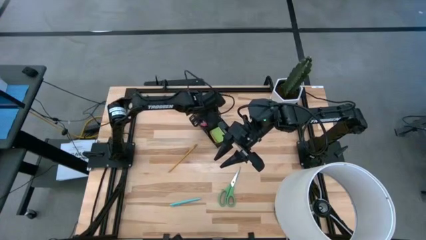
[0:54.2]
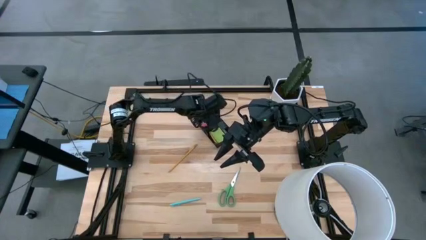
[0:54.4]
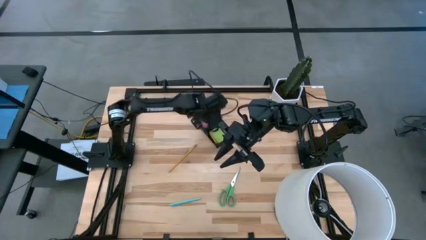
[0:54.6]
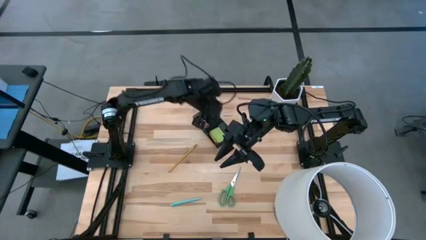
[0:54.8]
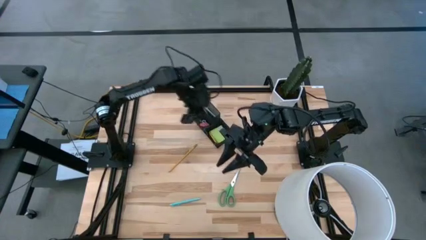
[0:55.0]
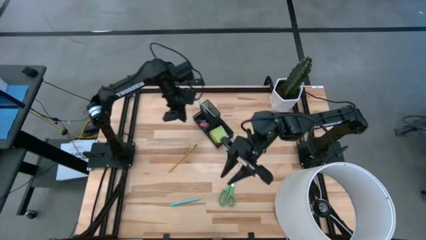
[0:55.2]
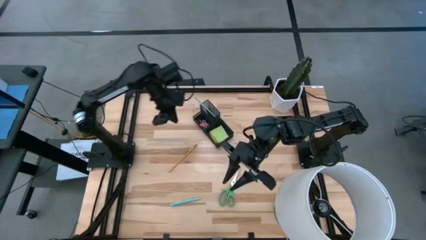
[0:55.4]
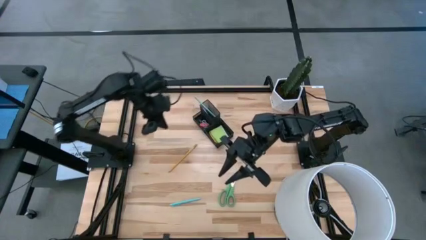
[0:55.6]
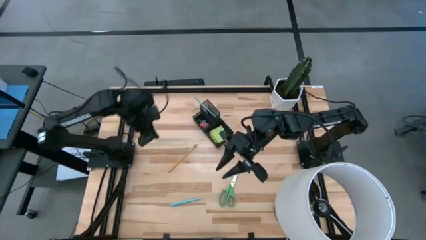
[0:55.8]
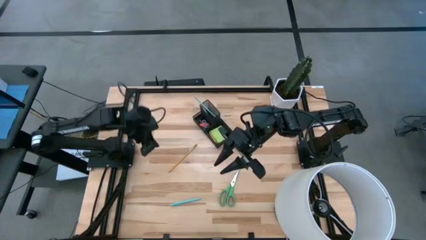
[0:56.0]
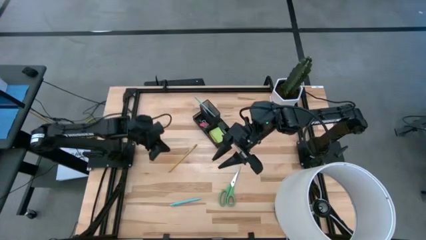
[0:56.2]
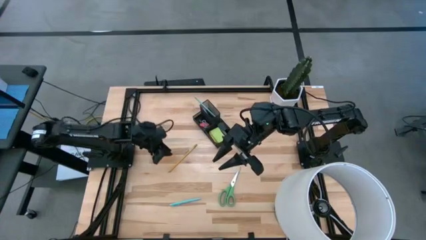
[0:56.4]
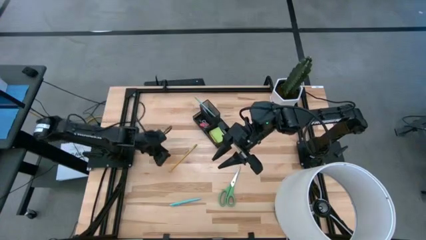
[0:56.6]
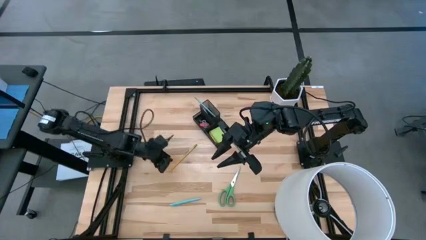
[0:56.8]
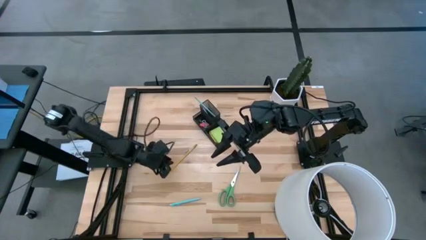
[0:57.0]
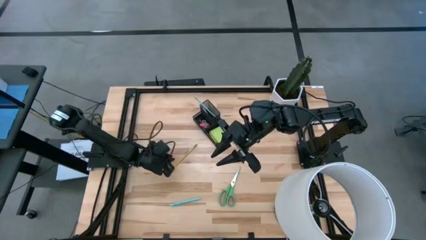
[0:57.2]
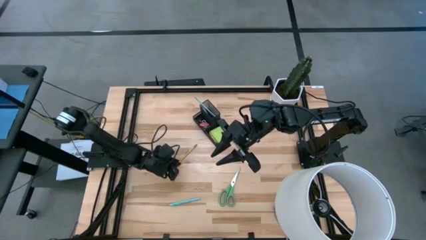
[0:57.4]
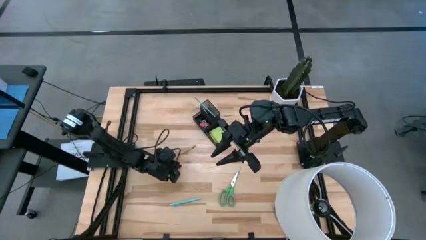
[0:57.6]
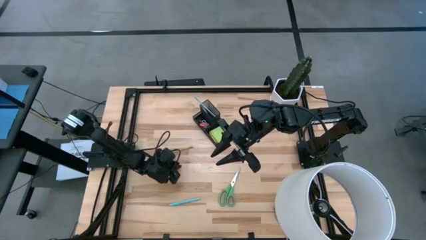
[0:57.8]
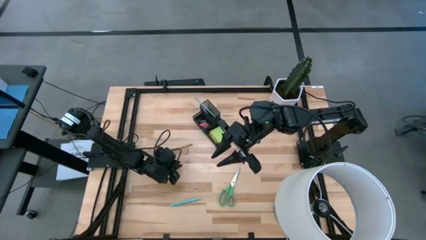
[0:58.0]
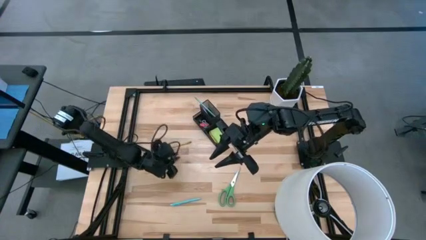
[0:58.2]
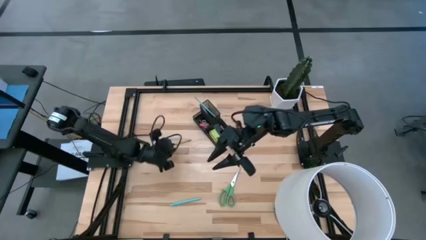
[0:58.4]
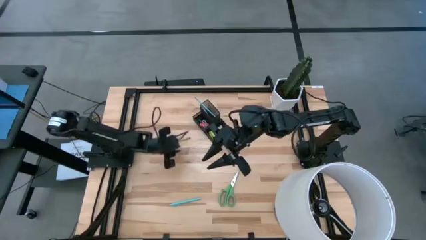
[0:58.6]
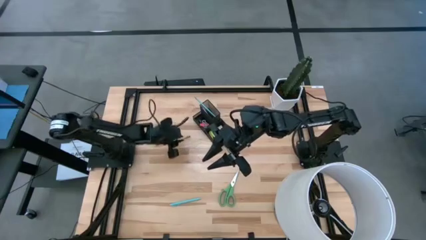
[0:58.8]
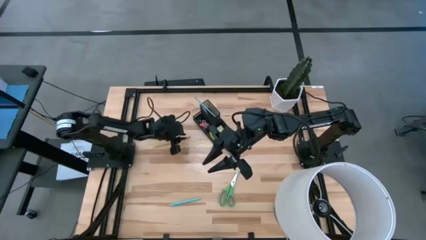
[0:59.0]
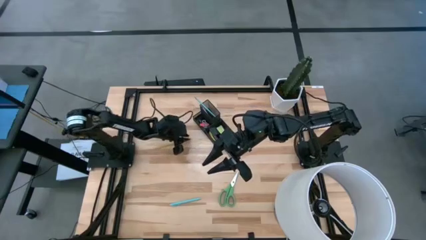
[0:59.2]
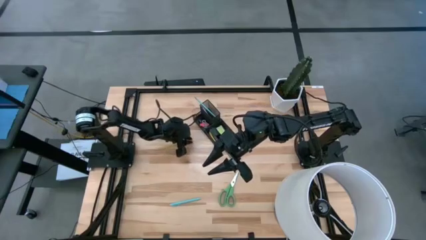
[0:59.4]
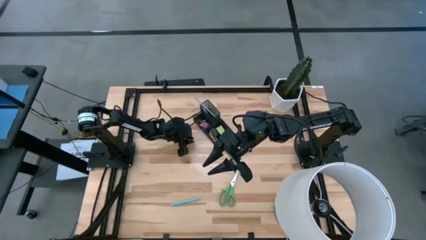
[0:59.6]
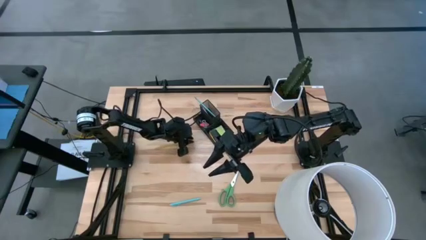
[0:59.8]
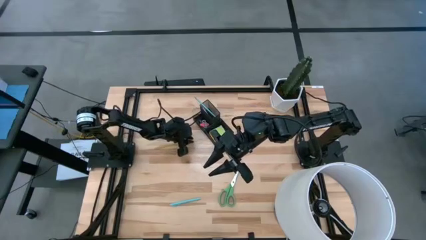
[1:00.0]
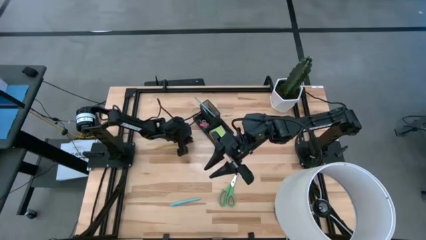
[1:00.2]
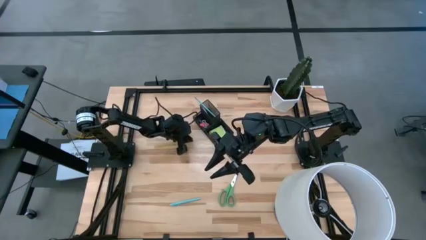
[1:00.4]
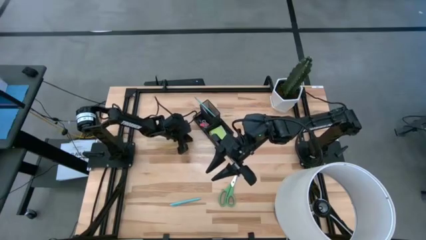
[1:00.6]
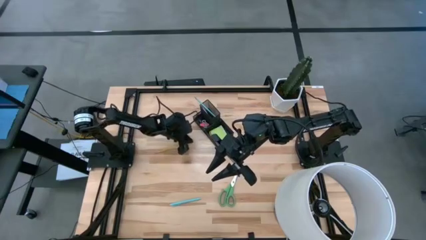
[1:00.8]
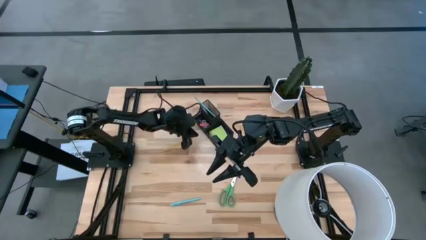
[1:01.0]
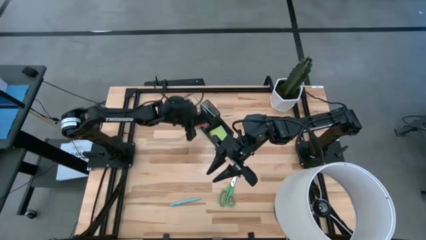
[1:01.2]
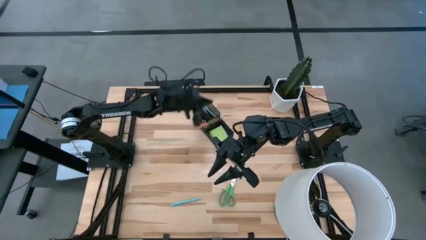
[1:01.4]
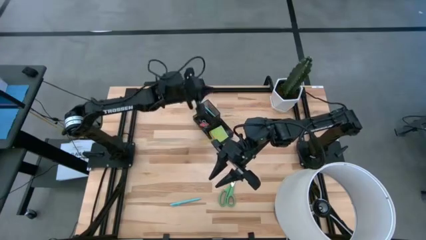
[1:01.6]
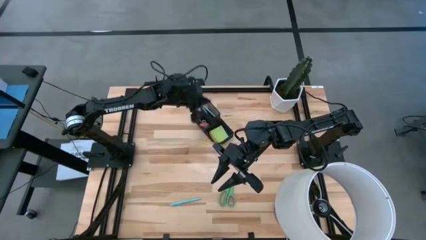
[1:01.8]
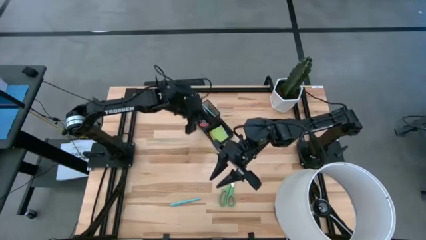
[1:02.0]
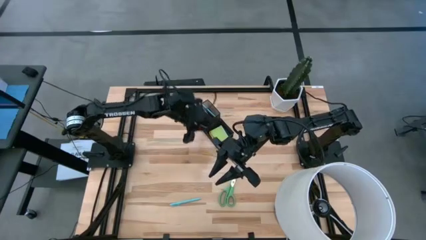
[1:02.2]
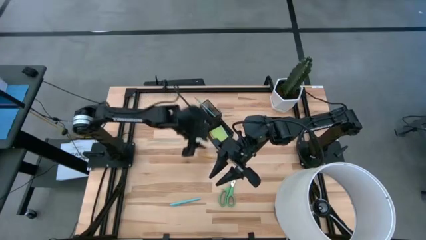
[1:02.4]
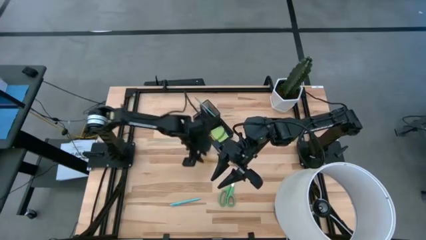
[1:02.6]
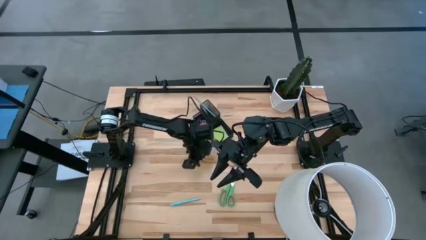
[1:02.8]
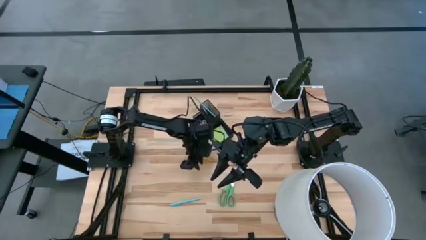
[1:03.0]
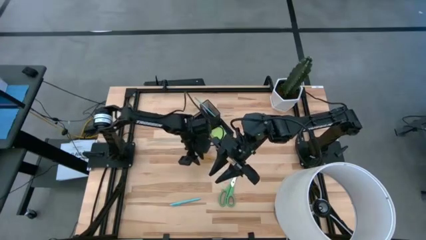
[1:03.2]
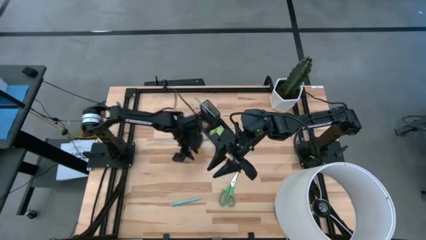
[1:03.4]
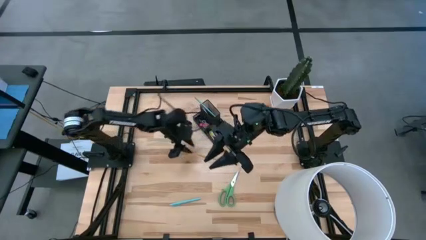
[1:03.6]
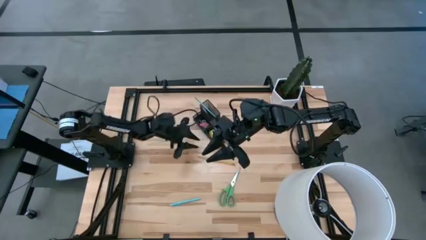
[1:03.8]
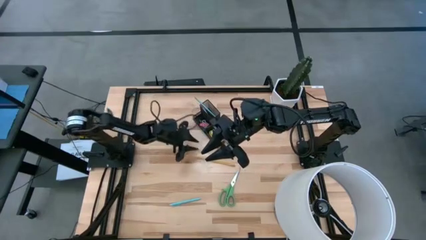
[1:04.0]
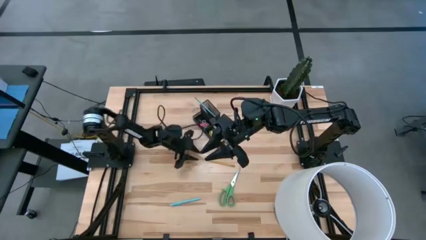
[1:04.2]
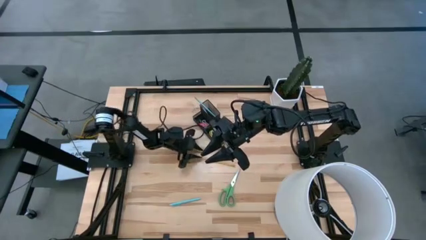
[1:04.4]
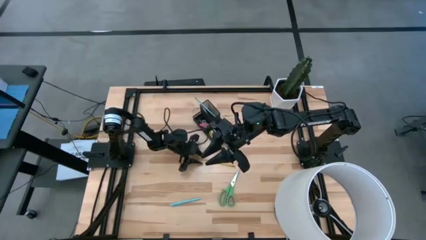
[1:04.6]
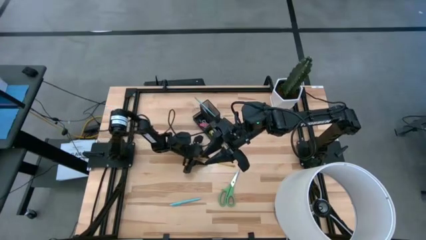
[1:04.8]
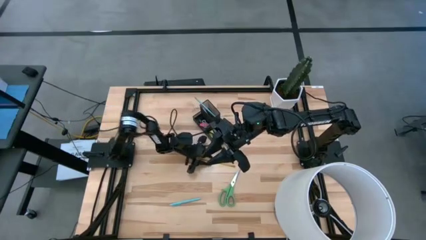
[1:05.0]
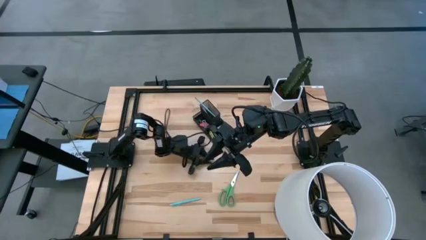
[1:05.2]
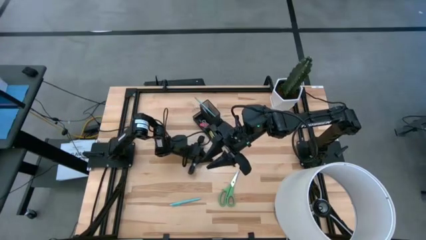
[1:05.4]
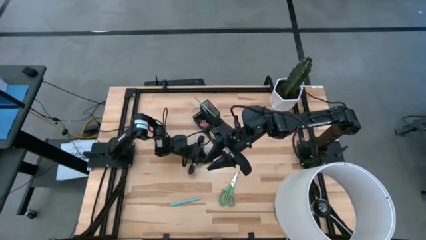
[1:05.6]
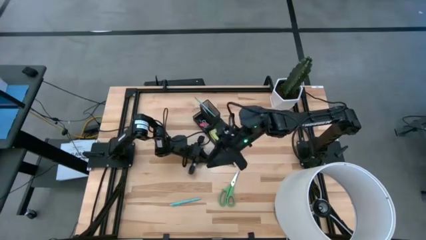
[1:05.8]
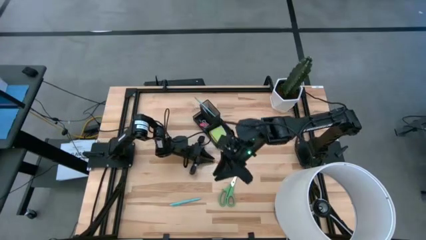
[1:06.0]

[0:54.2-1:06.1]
Task: Pick and place office supplies into organizer
Put the yellow pencil into the black desk organizer
